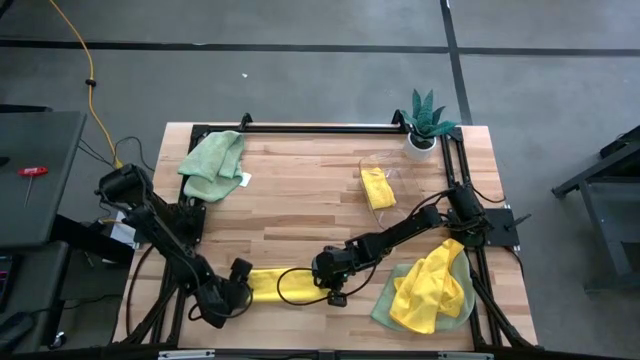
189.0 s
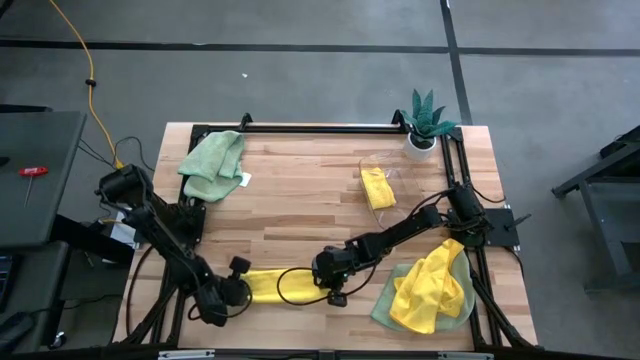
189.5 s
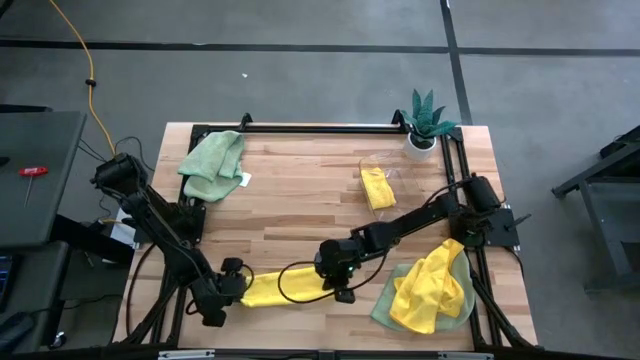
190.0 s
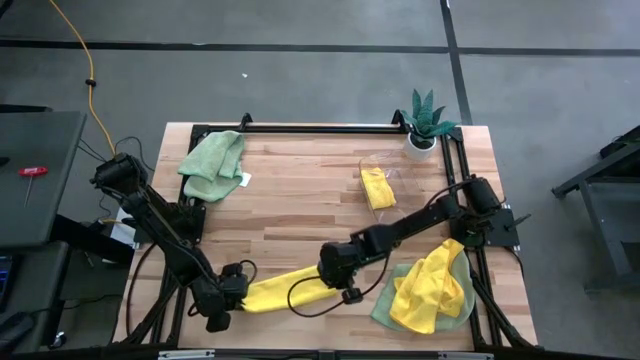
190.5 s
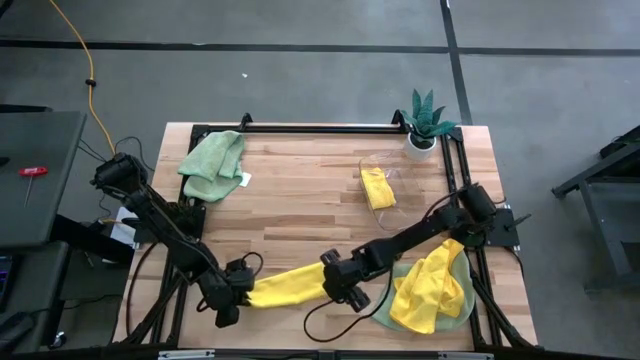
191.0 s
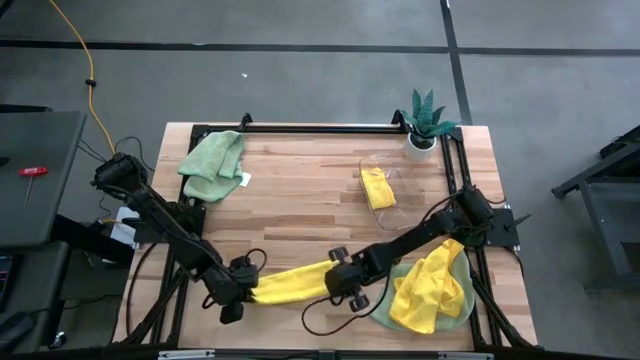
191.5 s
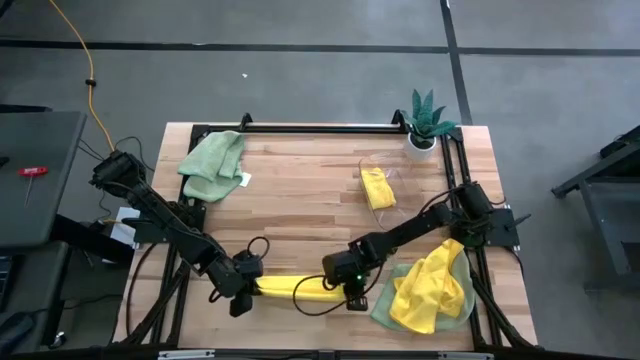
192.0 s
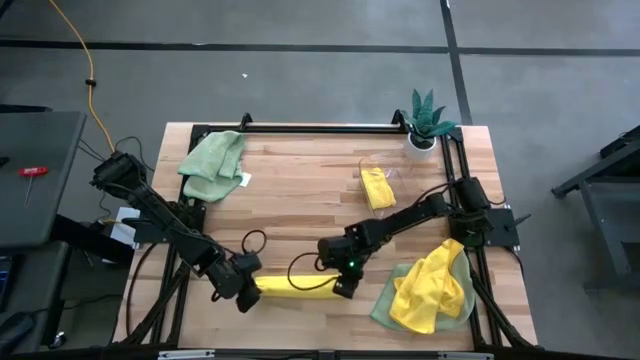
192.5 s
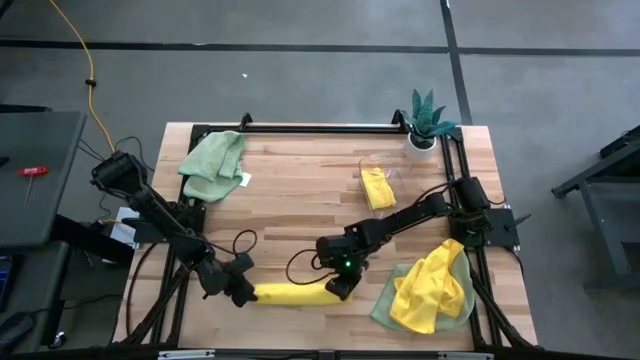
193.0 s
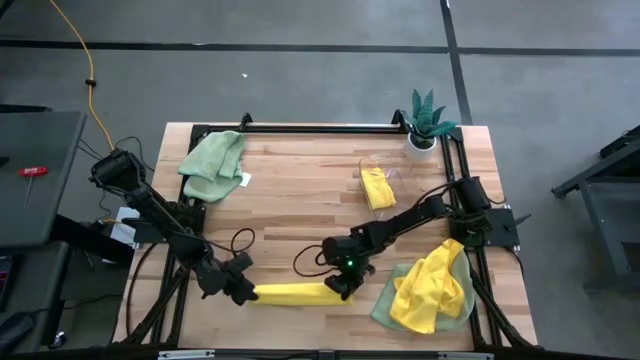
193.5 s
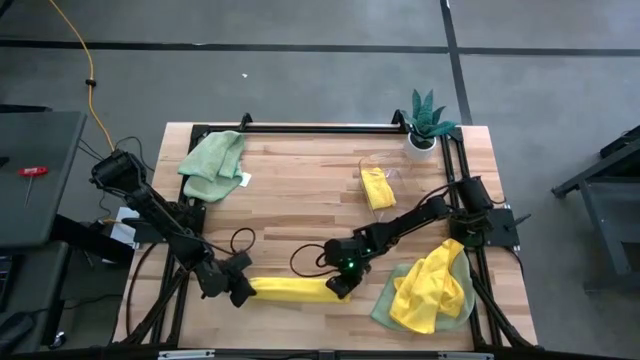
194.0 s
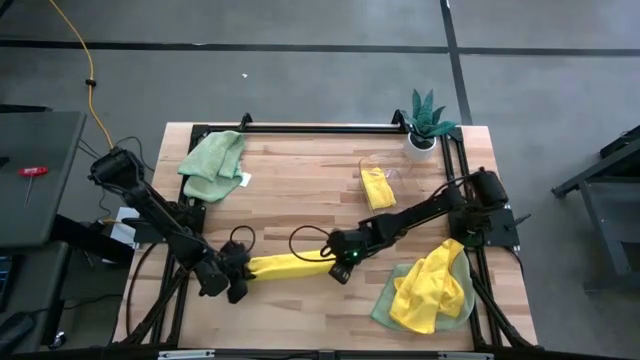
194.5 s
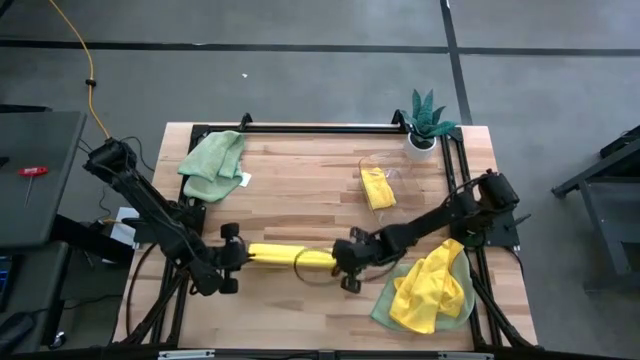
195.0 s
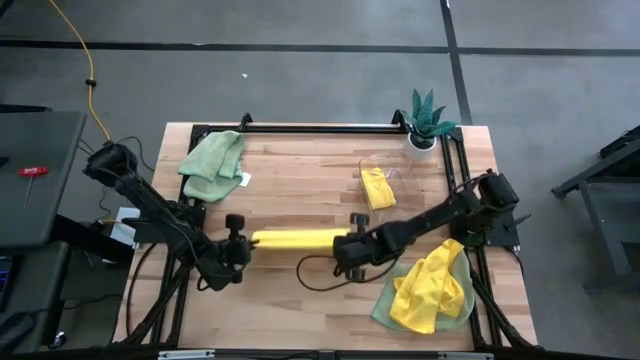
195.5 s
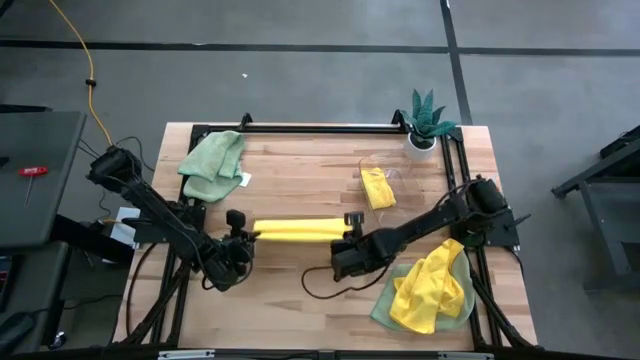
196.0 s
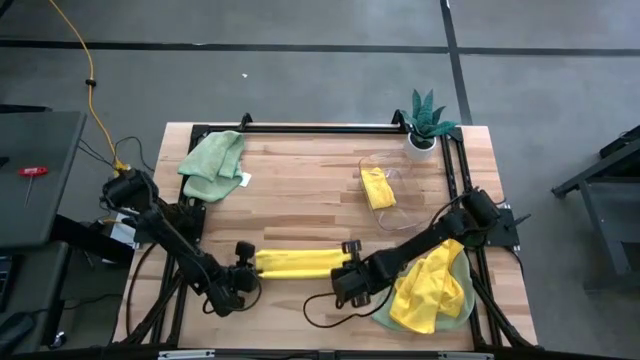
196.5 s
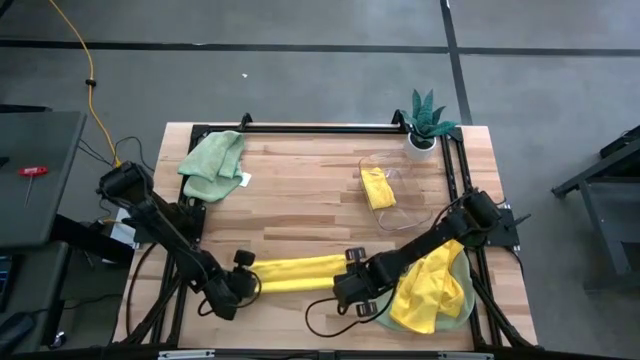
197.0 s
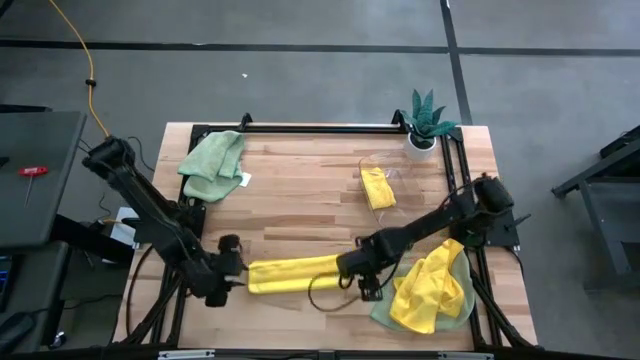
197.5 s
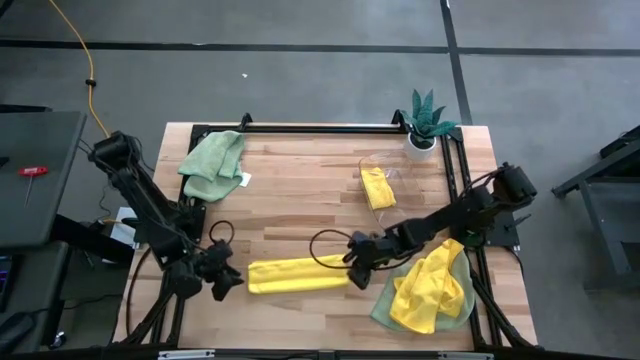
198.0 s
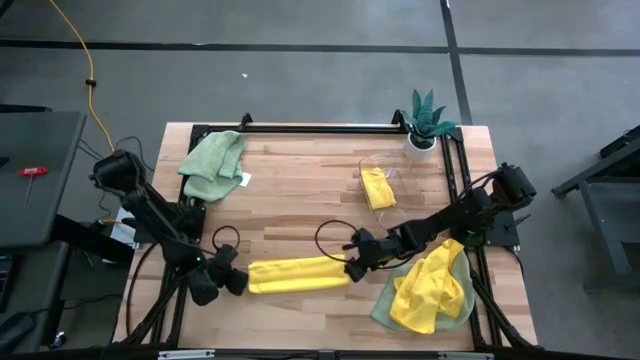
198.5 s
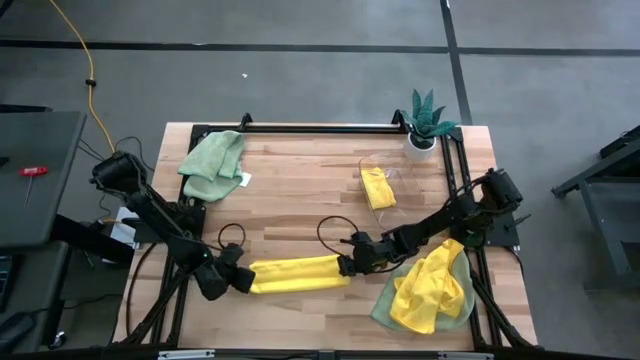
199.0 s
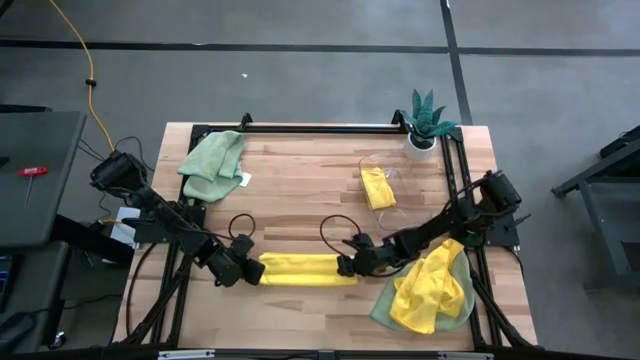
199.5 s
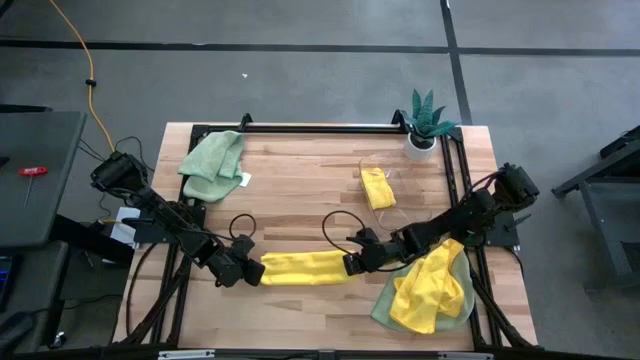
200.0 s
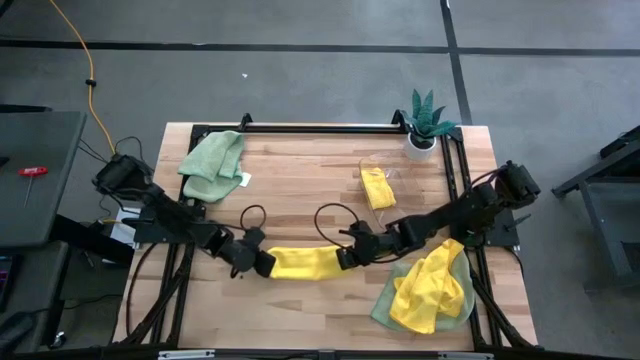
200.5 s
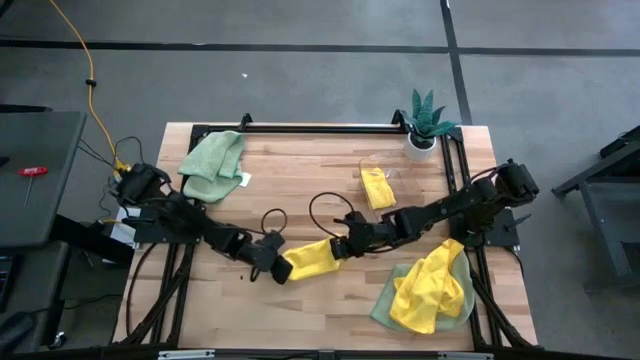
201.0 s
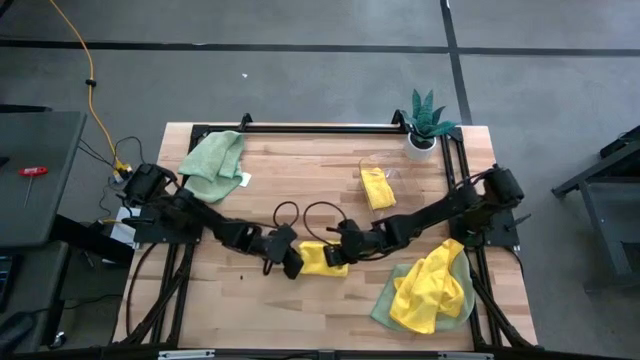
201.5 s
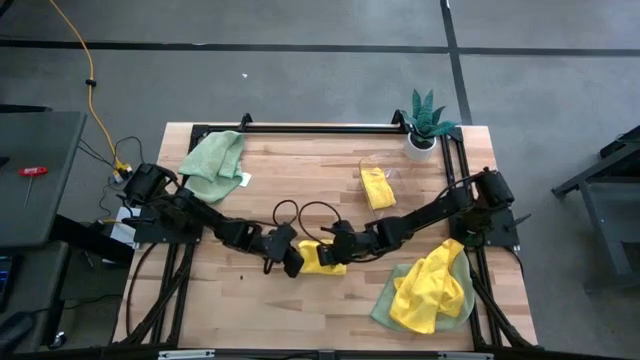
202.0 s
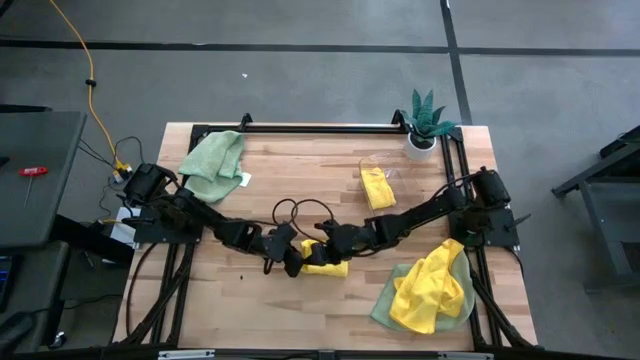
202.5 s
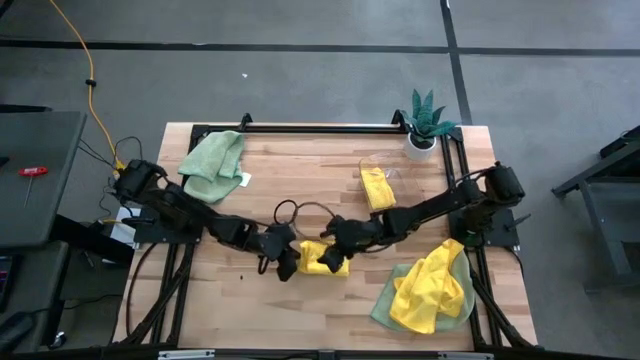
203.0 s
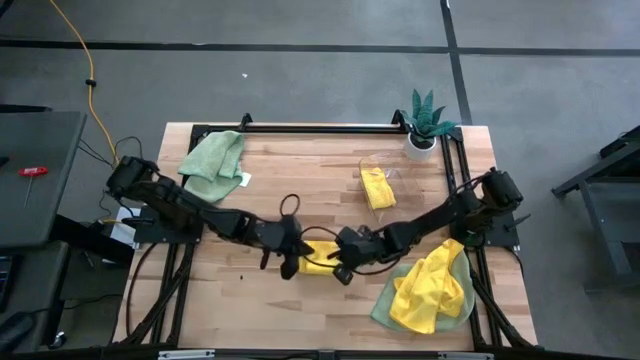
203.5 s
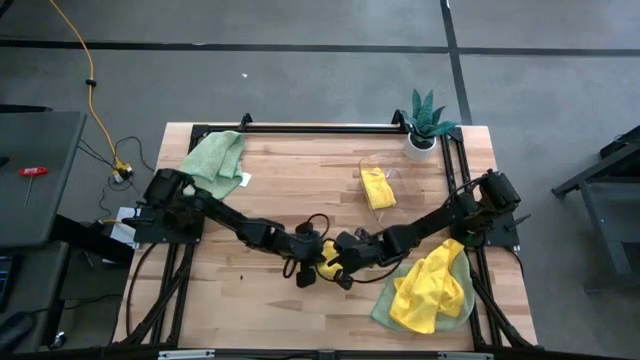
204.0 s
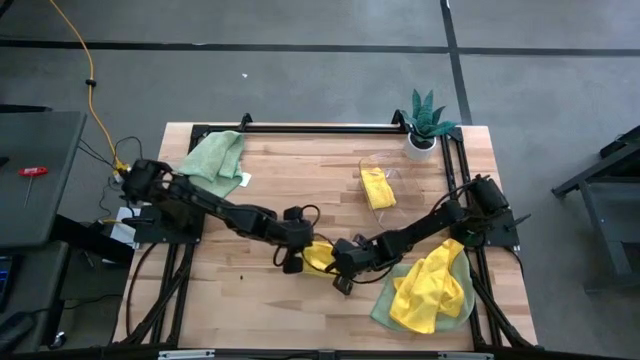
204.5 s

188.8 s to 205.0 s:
Task: Fold microfiber towels
Fold the top yellow microfiber towel

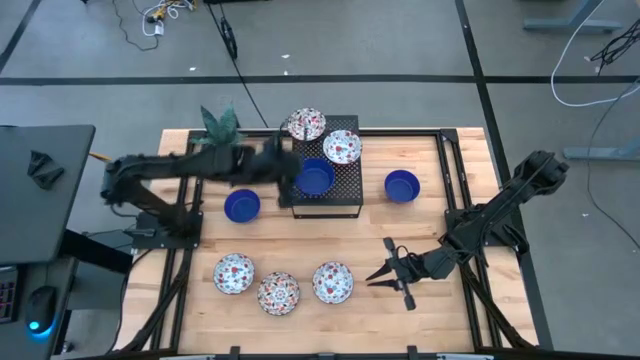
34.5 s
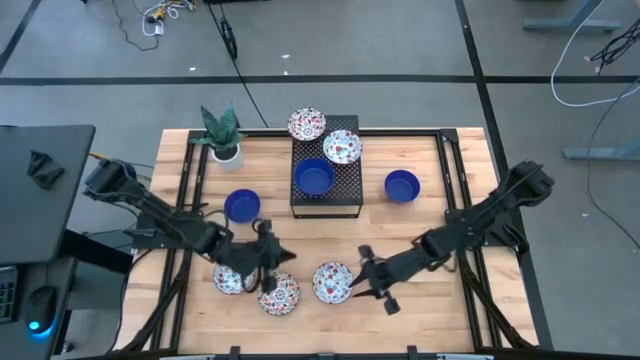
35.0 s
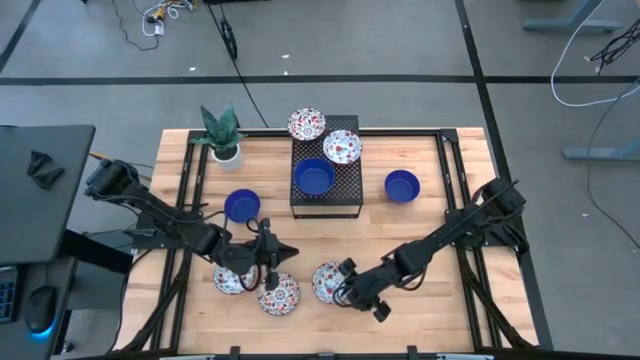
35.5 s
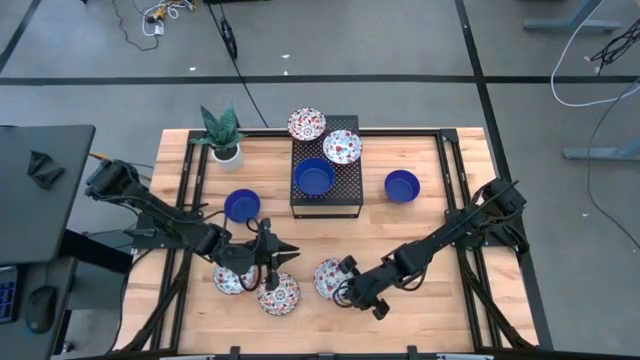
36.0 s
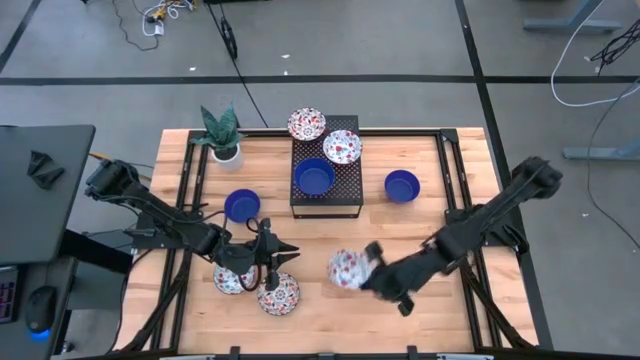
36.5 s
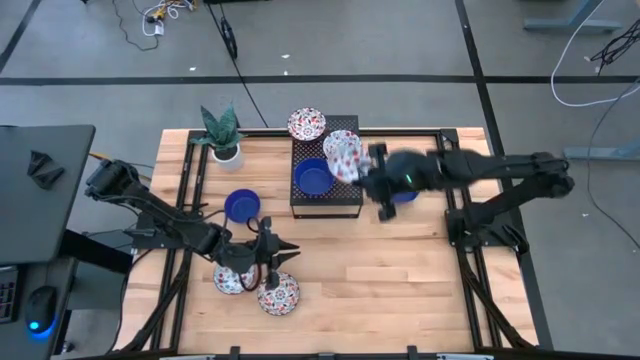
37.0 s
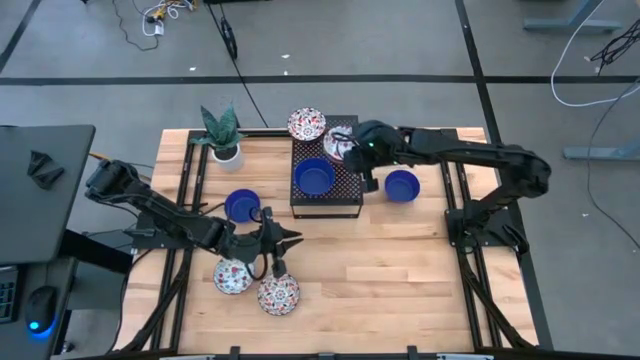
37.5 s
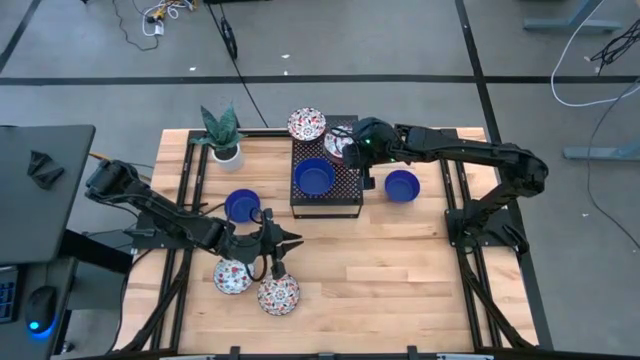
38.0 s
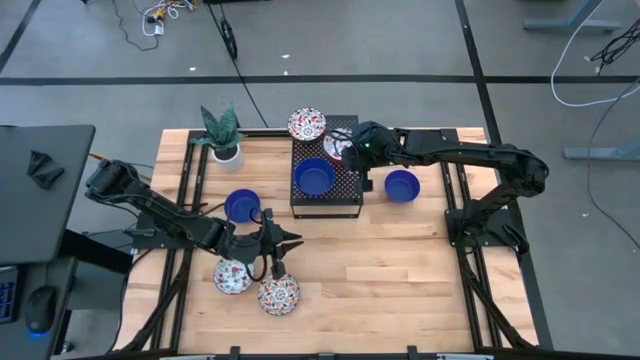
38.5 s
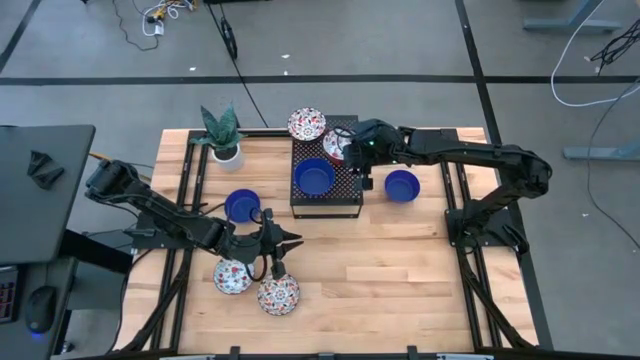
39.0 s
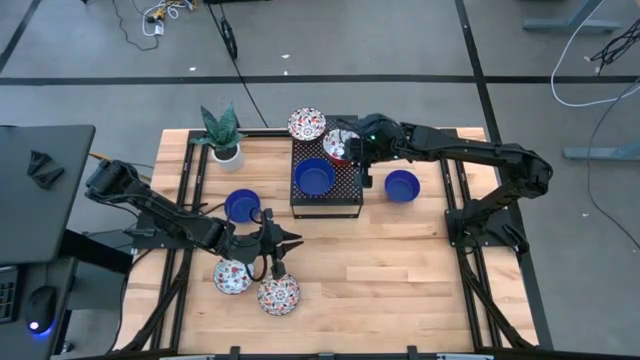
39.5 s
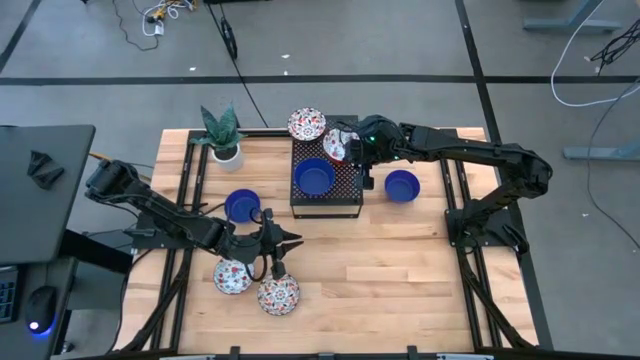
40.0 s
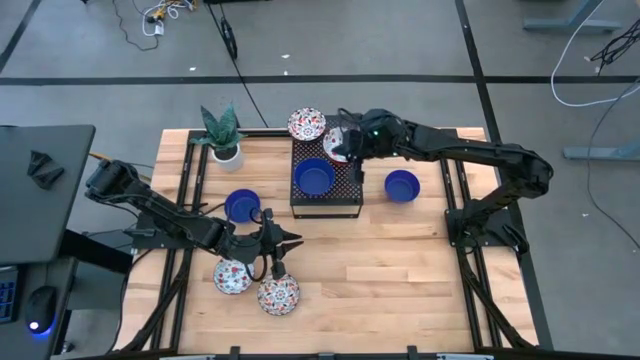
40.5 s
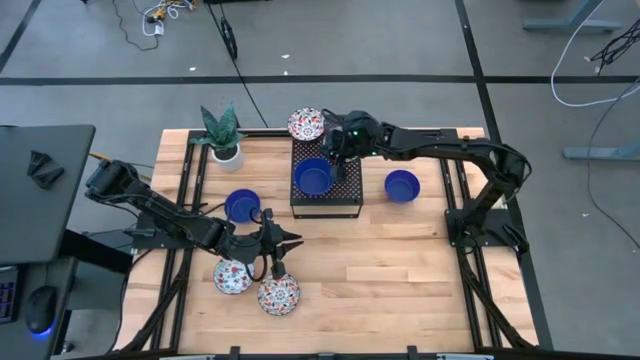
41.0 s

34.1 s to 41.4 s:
Task: Pick & Place Mini bowls
Stack the right red patterned bowl on top of the other red patterned bowl on the shelf
